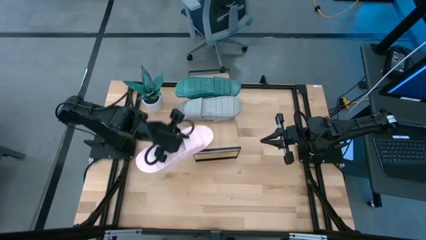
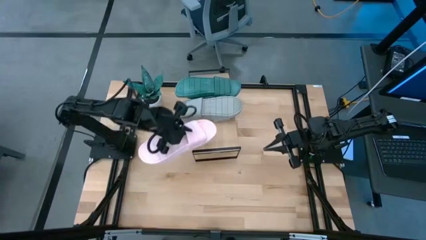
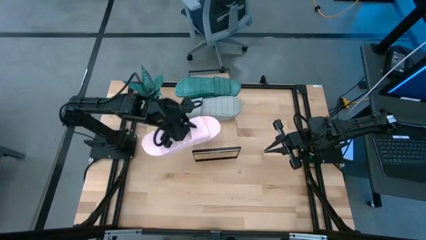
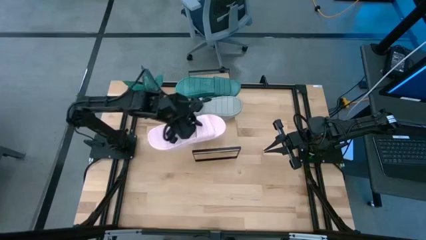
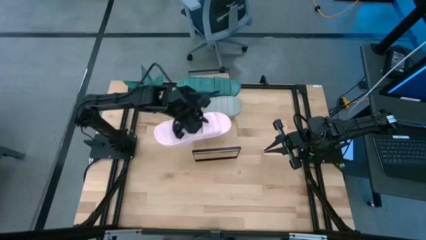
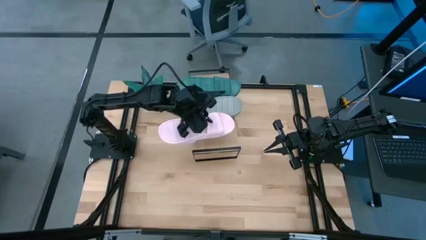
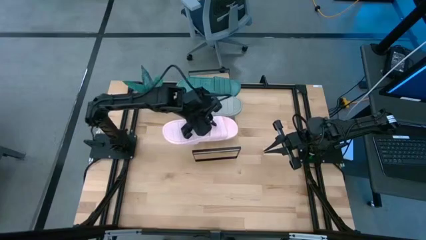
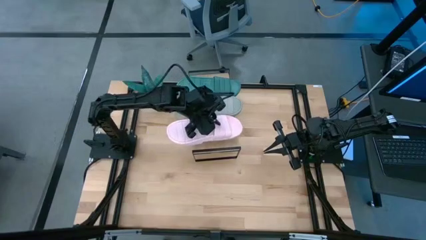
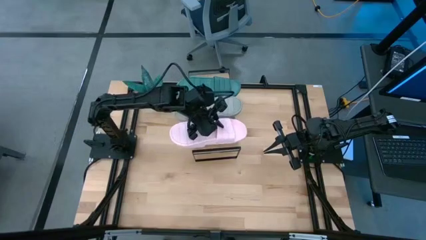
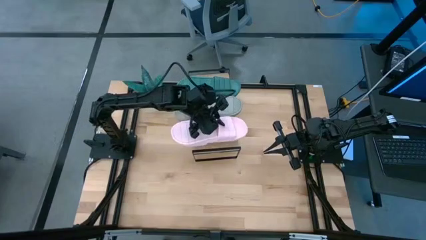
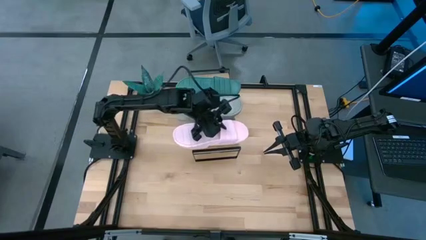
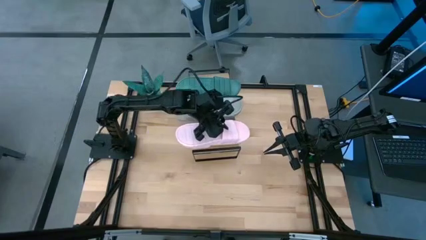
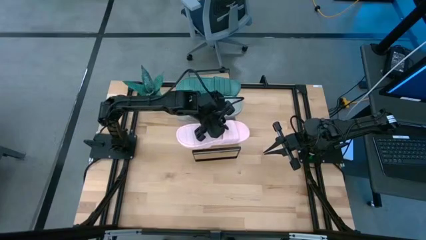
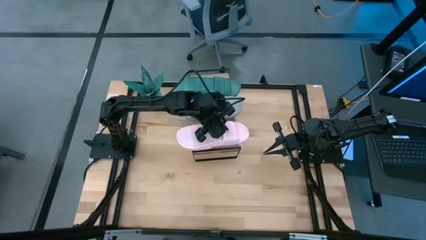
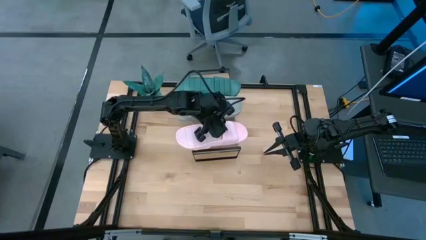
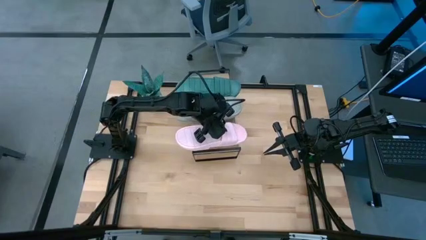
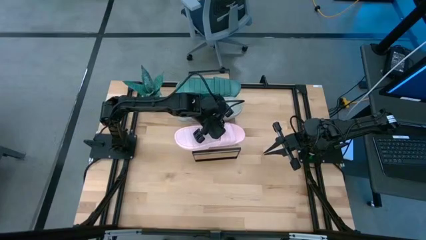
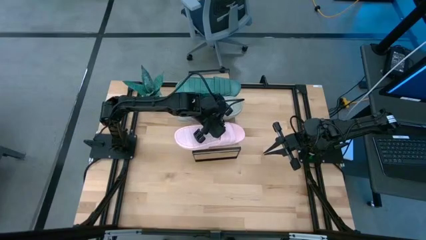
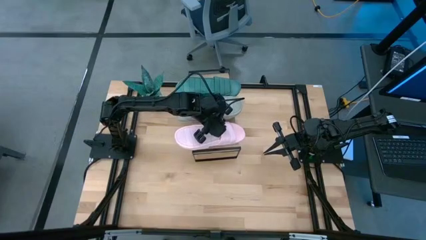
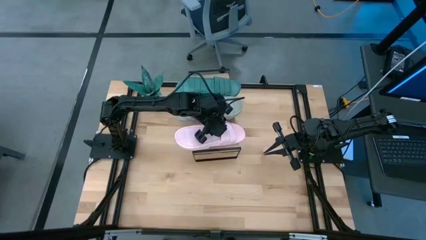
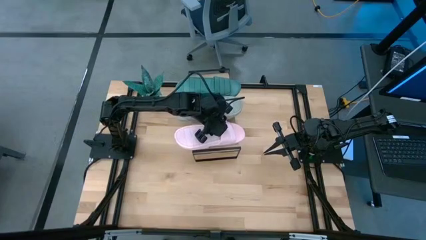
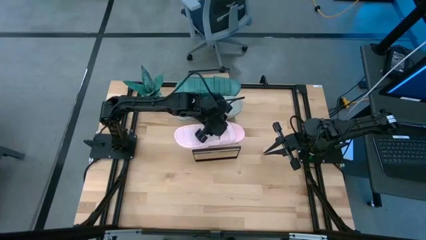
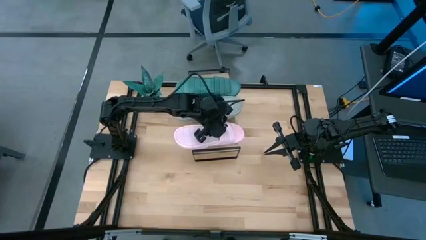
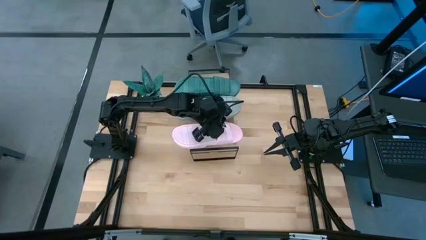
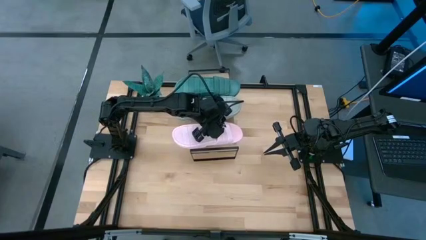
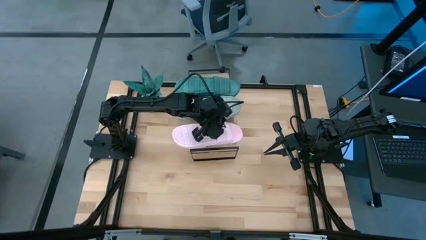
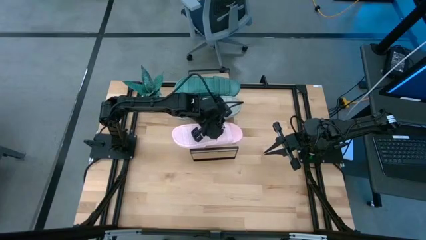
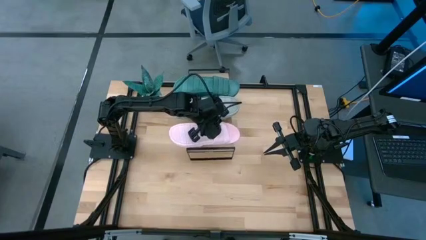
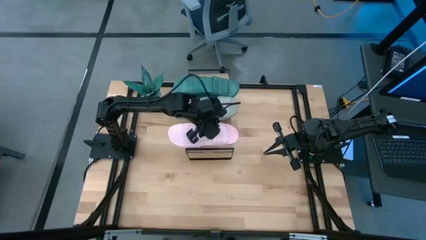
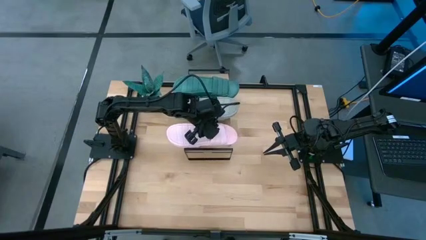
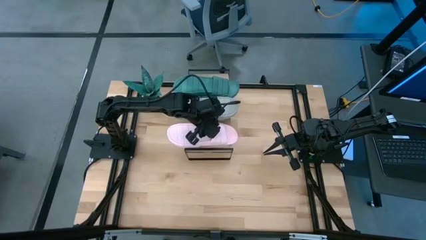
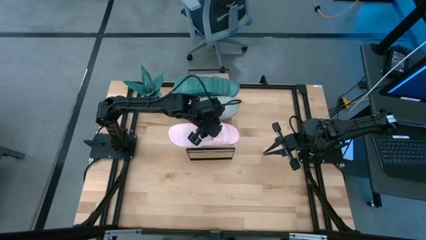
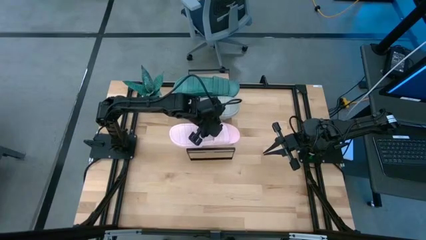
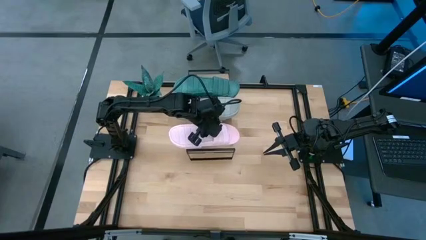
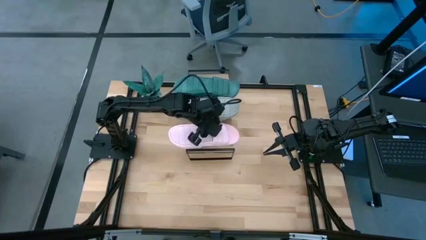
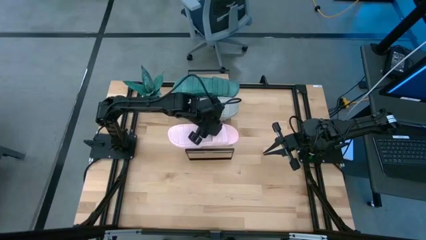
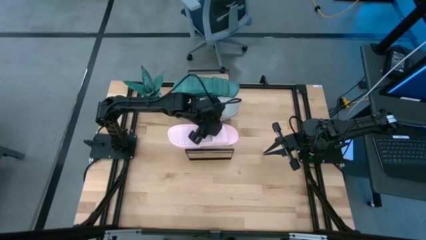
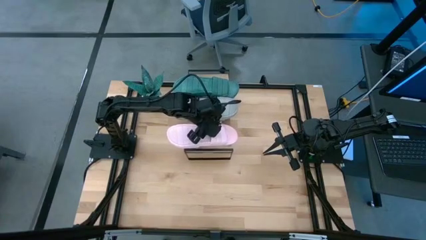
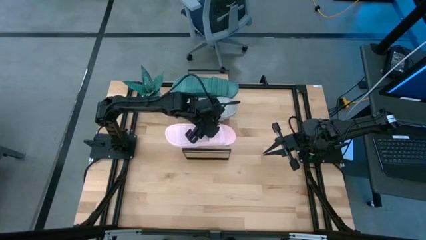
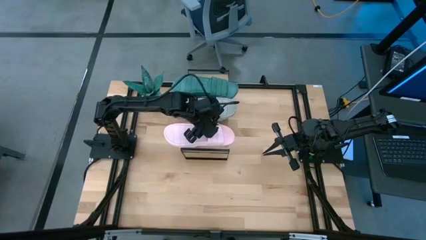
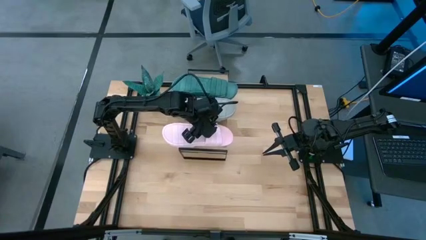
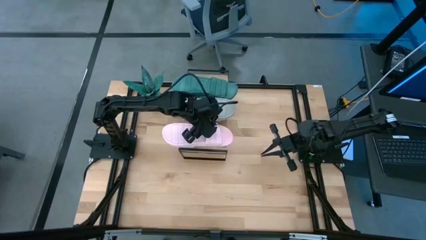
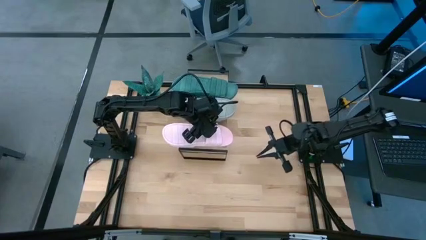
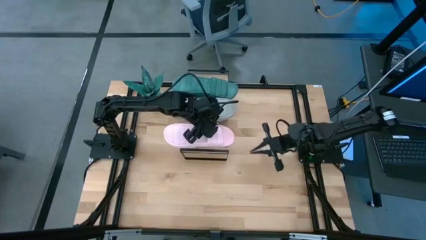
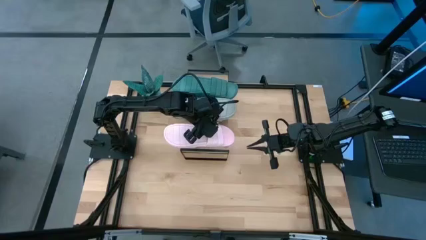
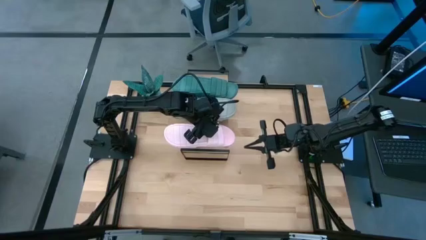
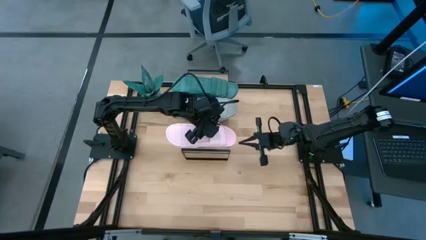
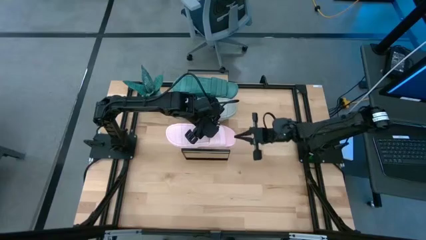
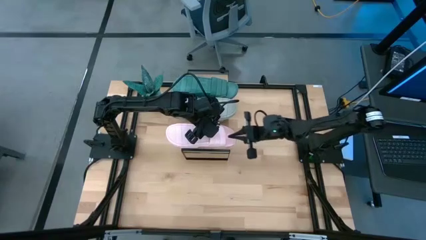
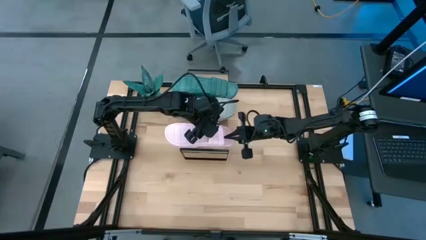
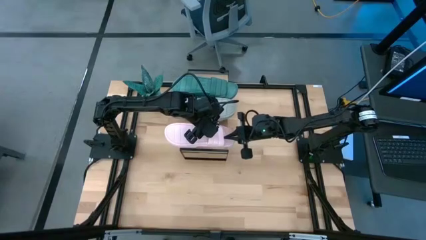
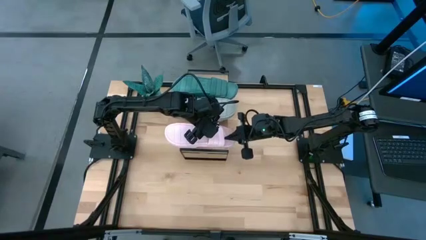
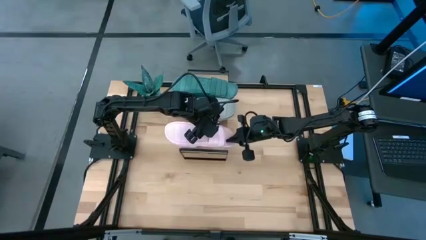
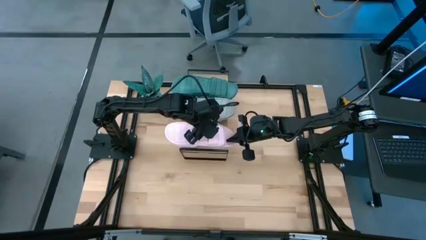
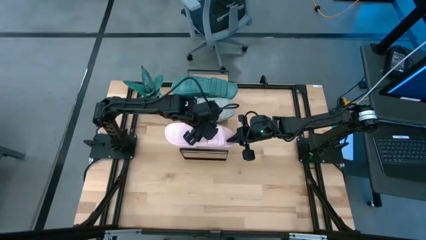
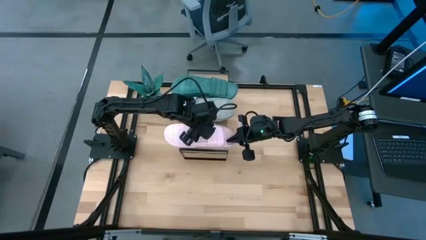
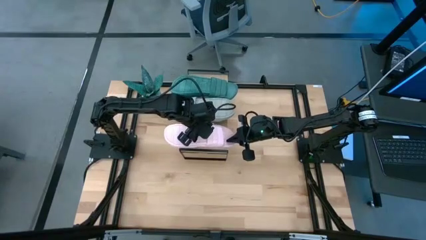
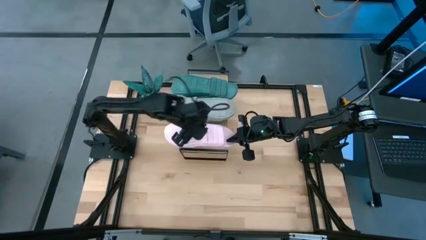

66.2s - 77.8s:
Task: Pick and place slippers onto the shelf
Put the pink pair of slippers on the shelf

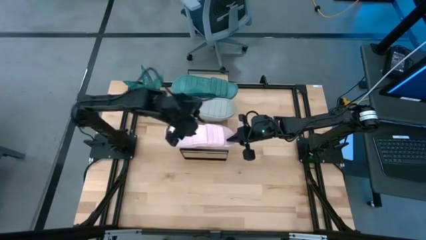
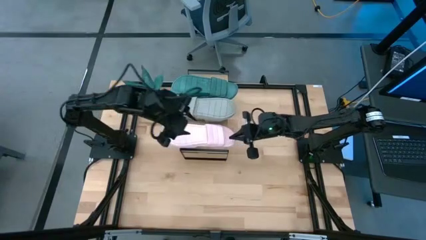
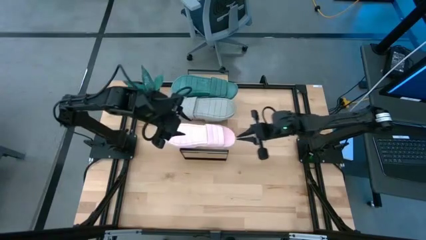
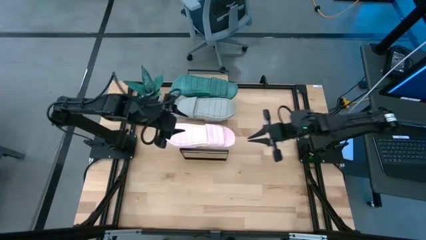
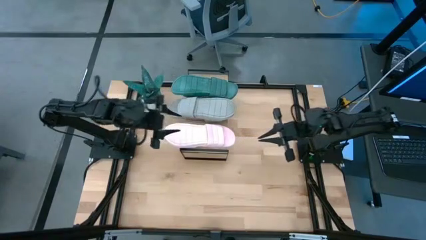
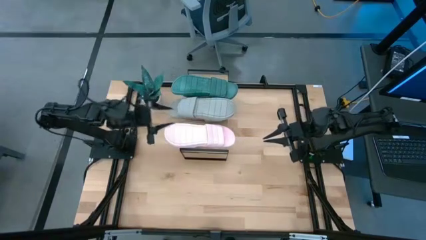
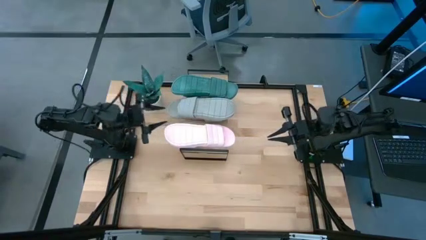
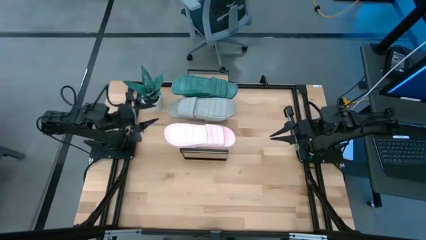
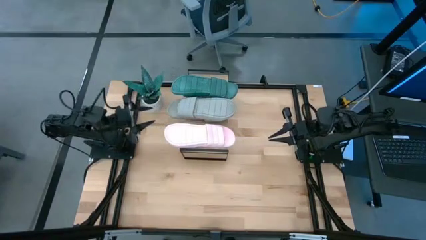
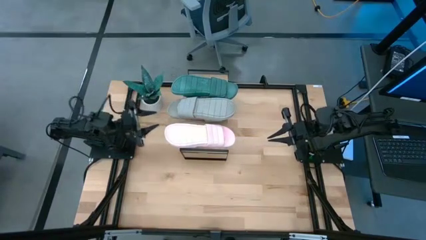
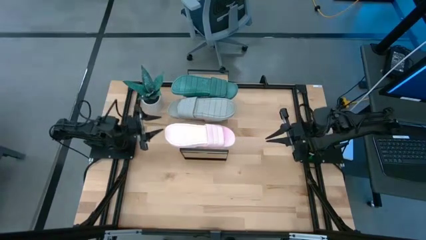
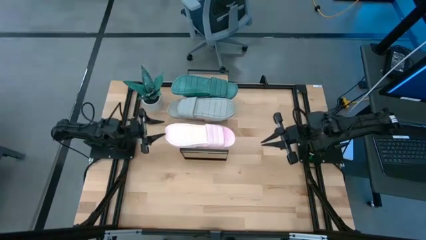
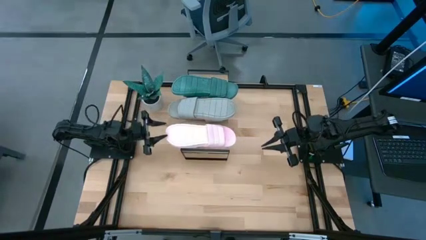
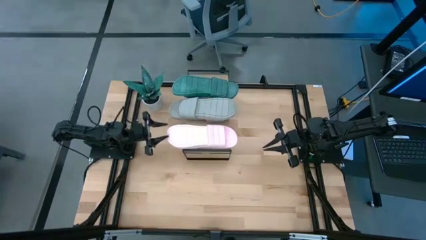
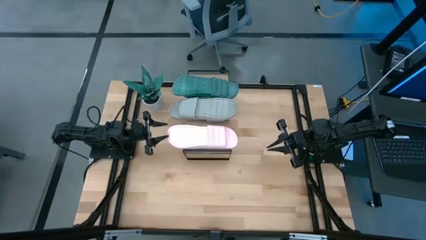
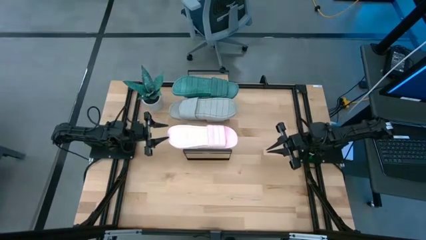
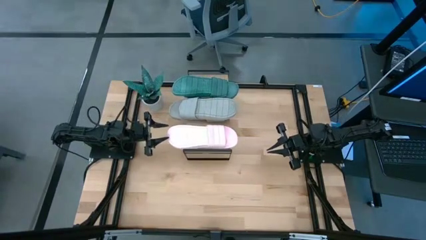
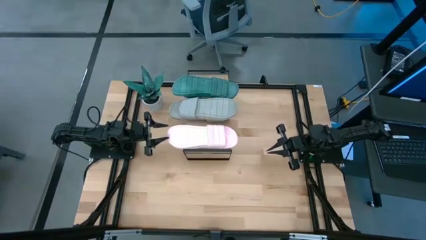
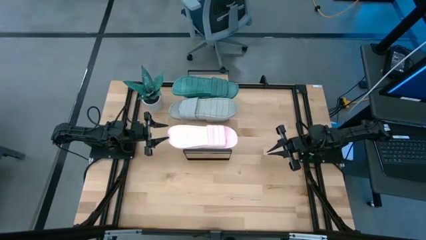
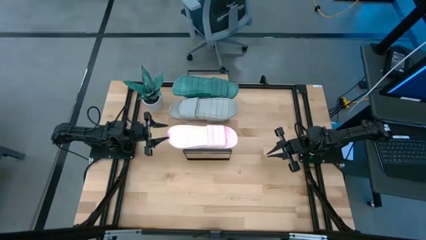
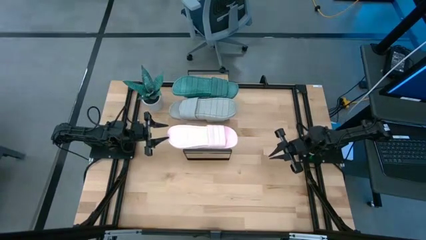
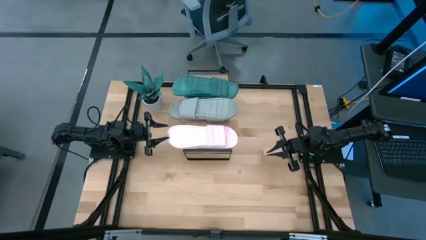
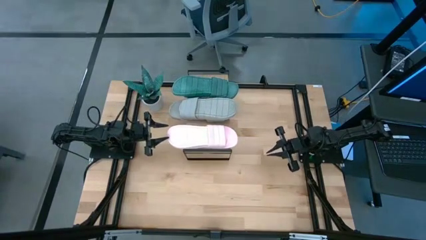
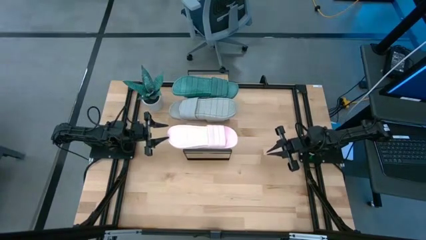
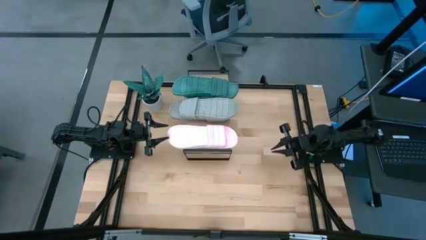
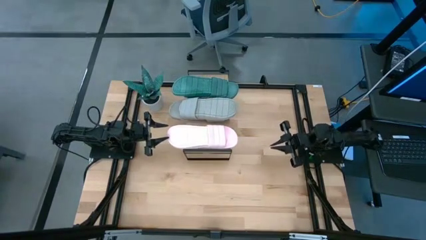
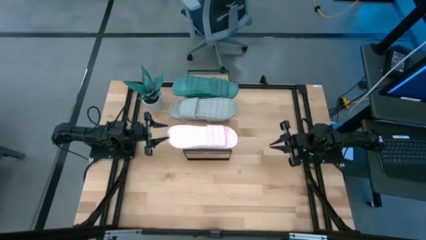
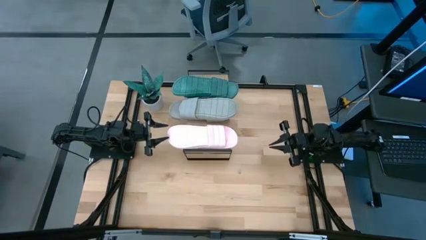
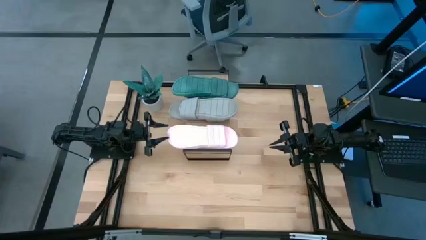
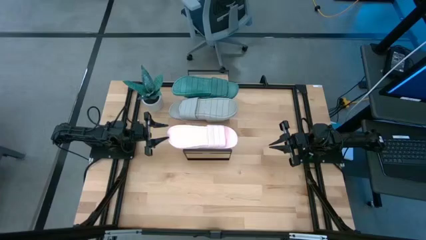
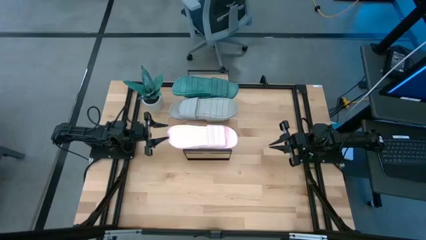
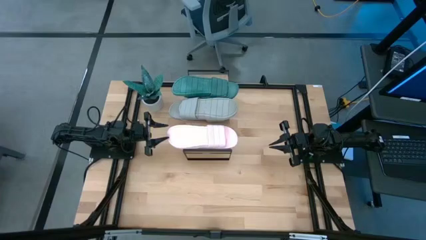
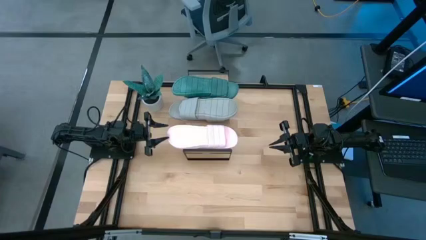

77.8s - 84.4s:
Return to Home Position
